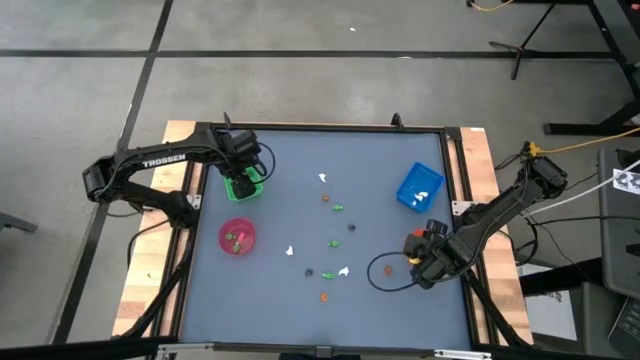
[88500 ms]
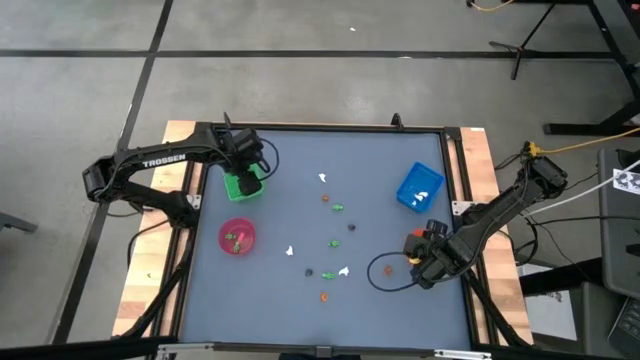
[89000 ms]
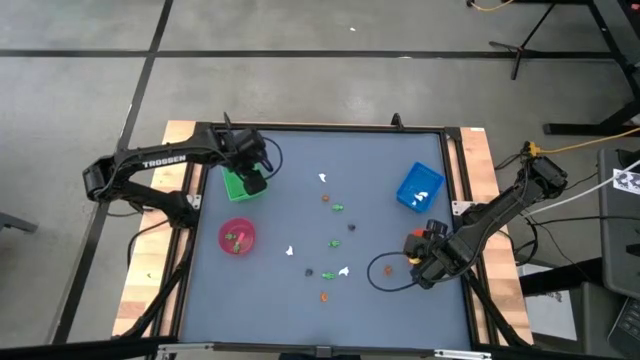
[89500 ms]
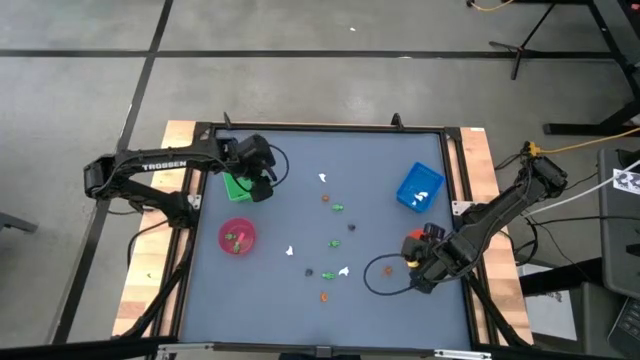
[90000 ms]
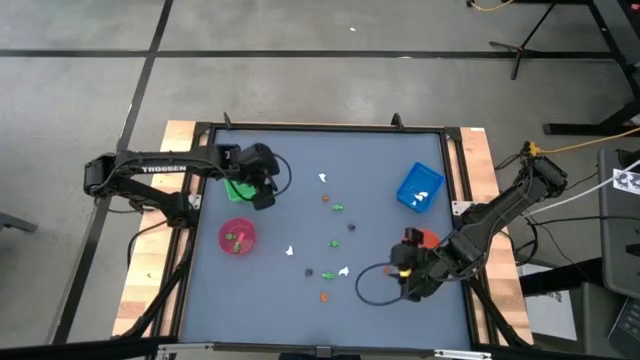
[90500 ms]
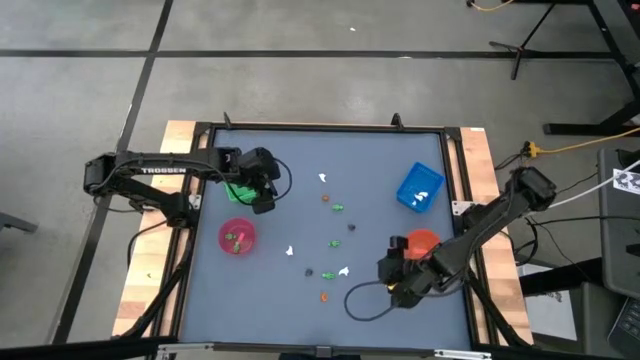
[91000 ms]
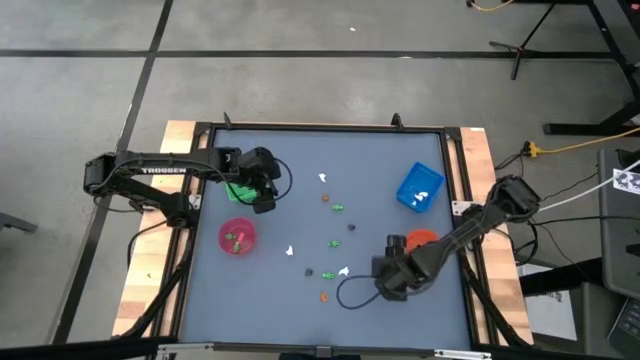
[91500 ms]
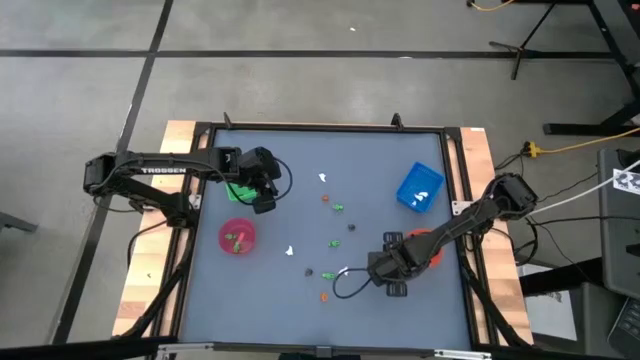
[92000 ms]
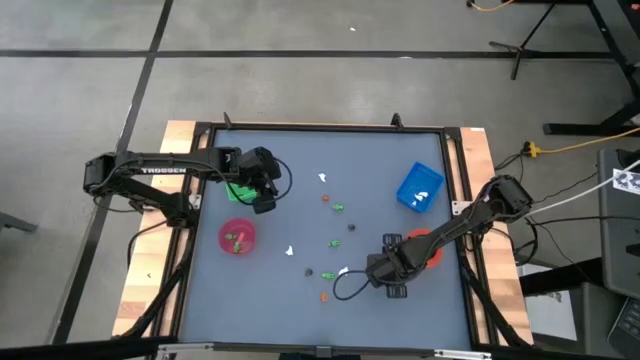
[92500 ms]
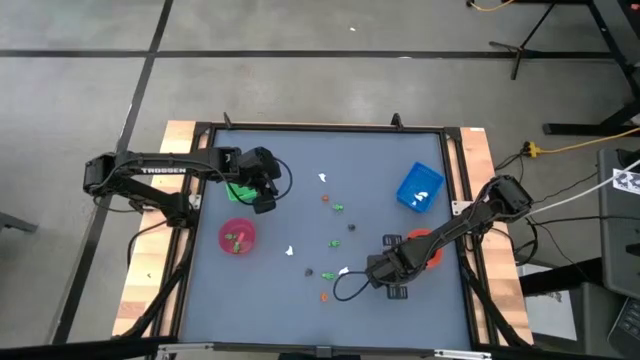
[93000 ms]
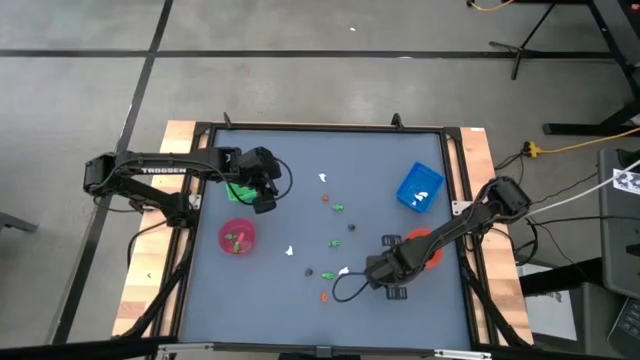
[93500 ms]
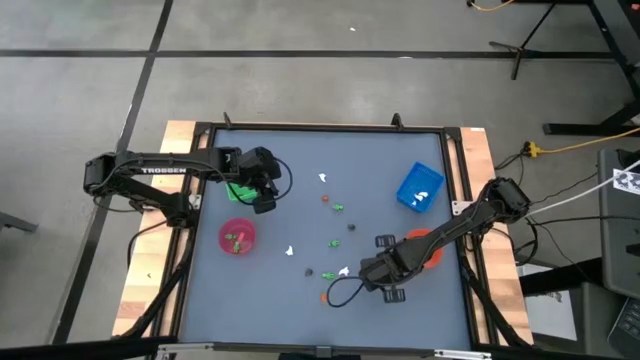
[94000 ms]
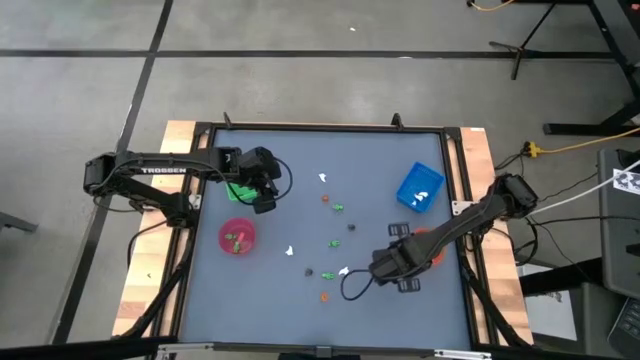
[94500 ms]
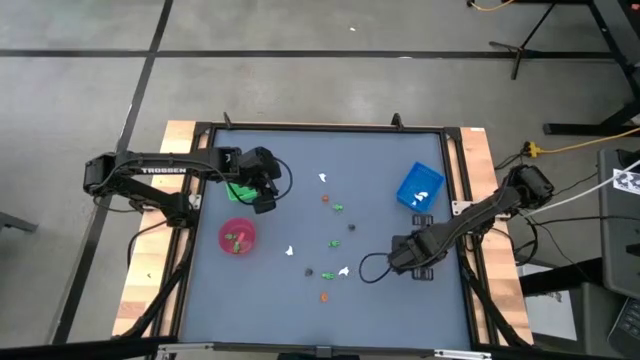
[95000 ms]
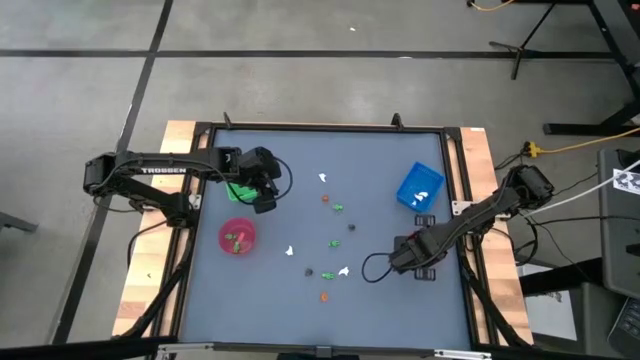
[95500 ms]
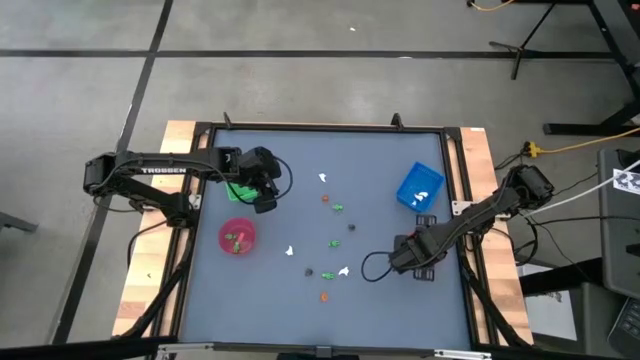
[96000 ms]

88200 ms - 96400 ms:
Task: Sort Halloween decoration
Put the small orange pumpkin toy into the transparent orange bowl

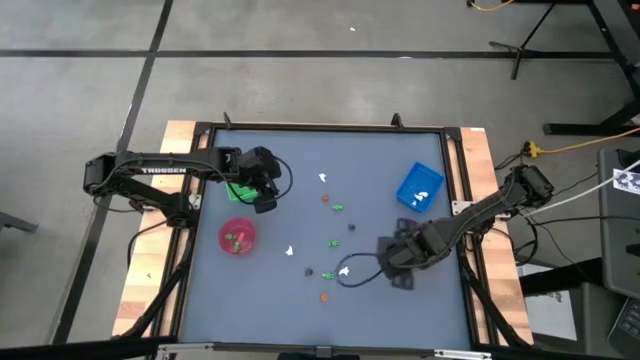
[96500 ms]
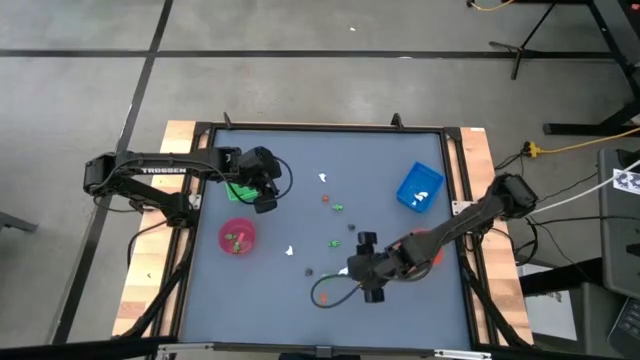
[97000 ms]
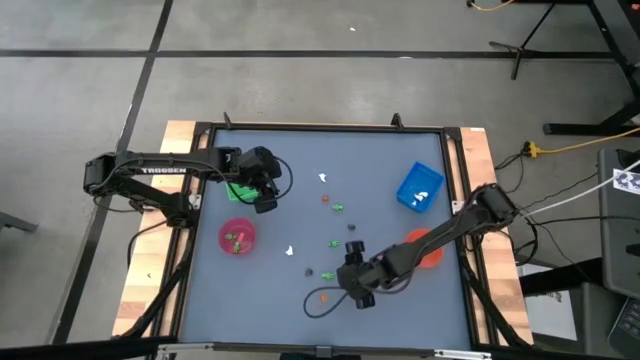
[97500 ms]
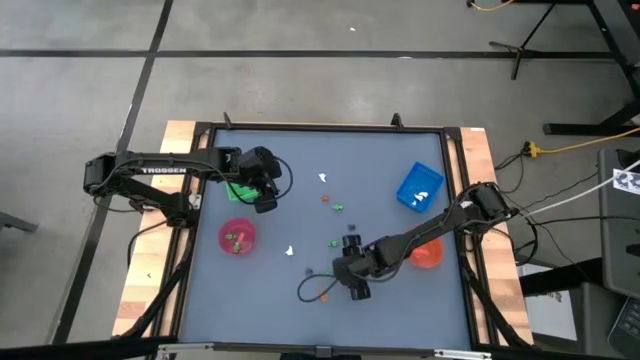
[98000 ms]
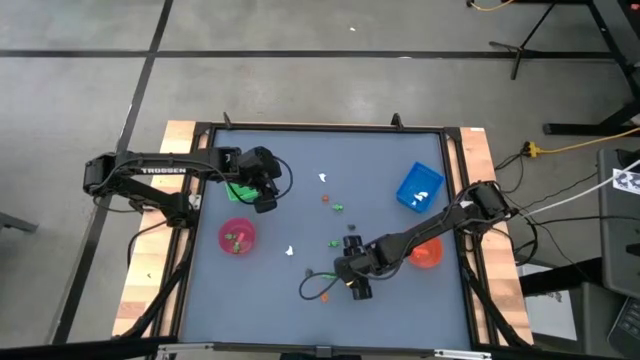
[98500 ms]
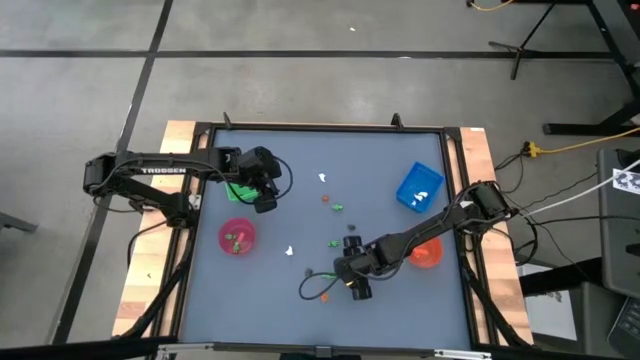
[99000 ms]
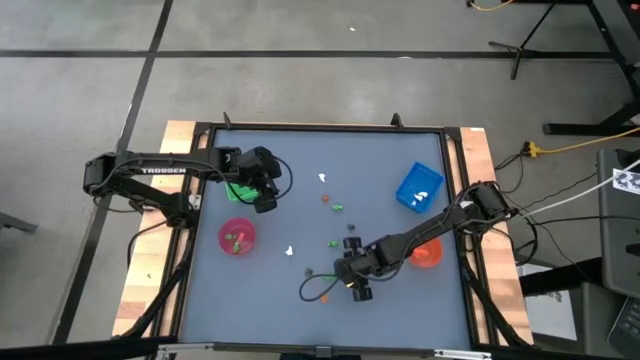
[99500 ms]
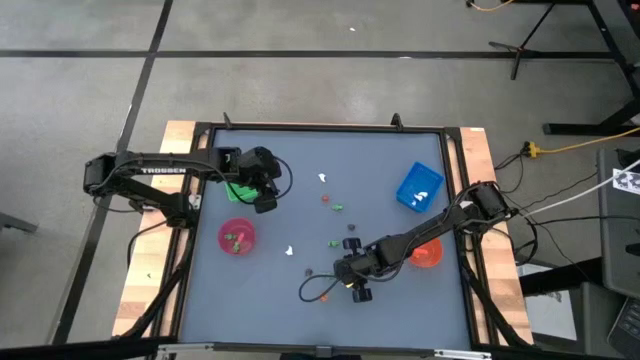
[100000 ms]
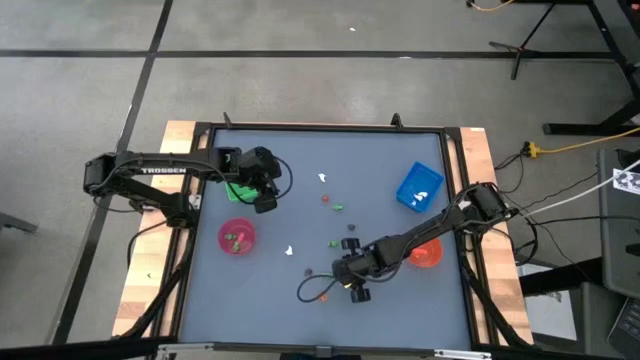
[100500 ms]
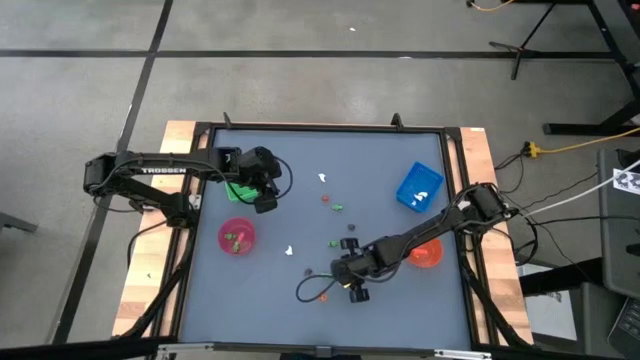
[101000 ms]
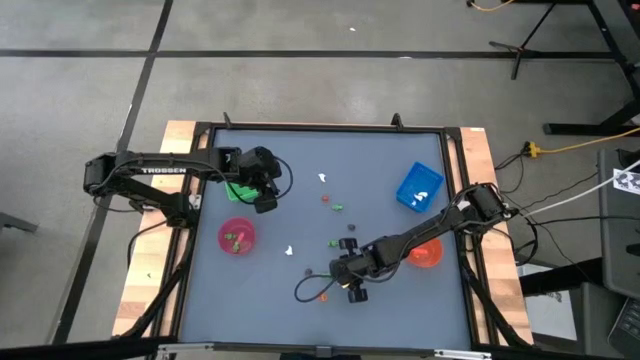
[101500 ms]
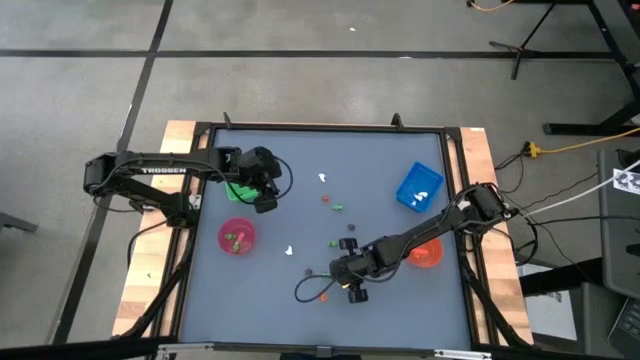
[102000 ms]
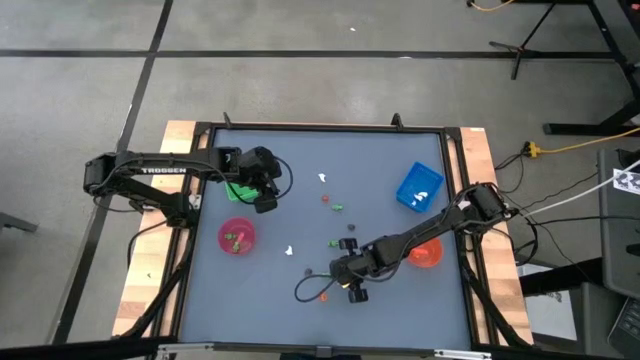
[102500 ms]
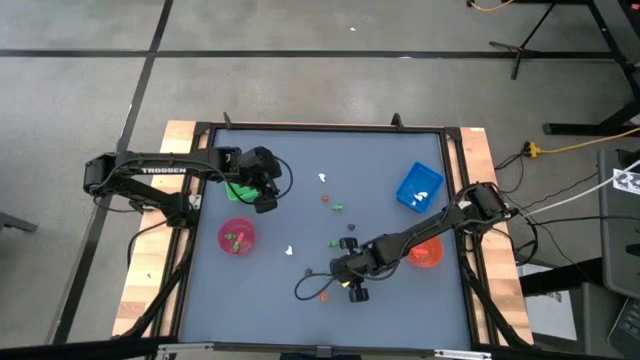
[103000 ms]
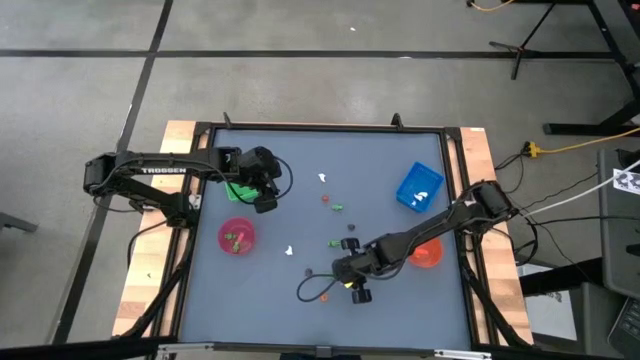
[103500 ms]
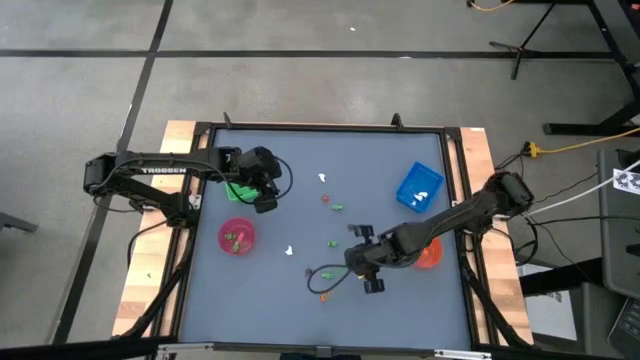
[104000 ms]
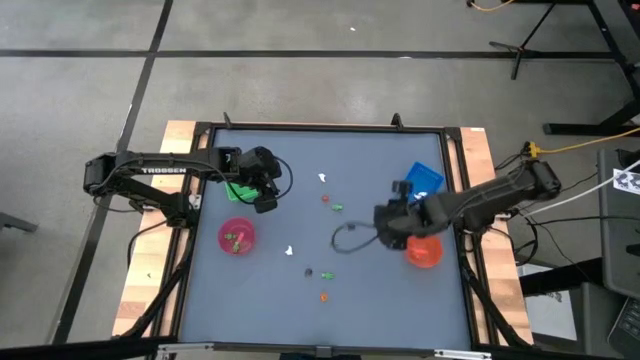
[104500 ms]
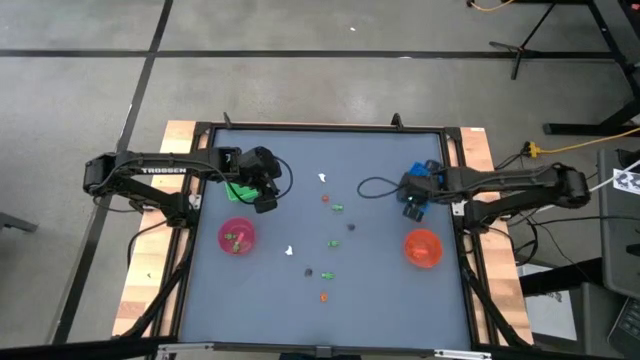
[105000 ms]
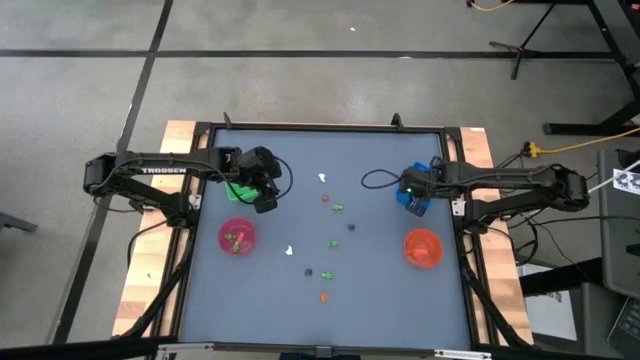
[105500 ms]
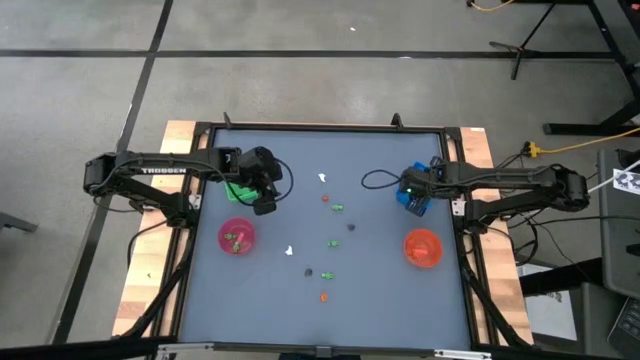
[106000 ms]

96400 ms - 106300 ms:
Put the small white ghost toy into the blue basket

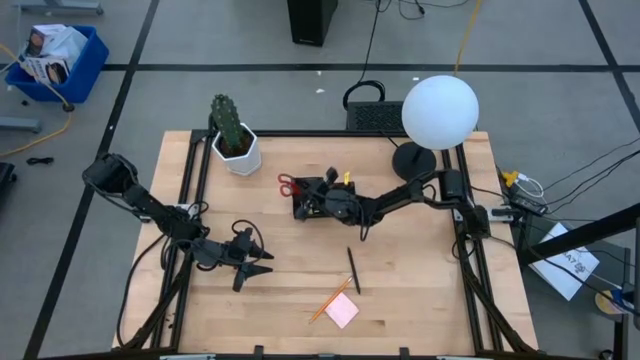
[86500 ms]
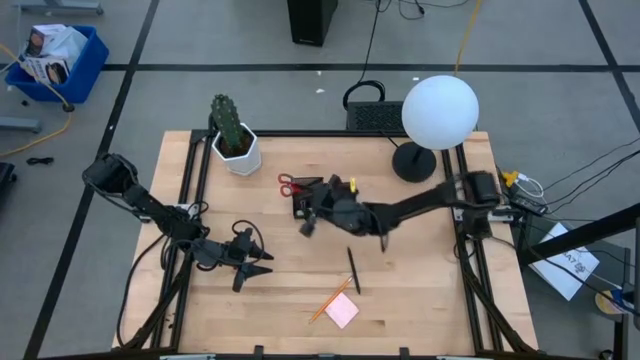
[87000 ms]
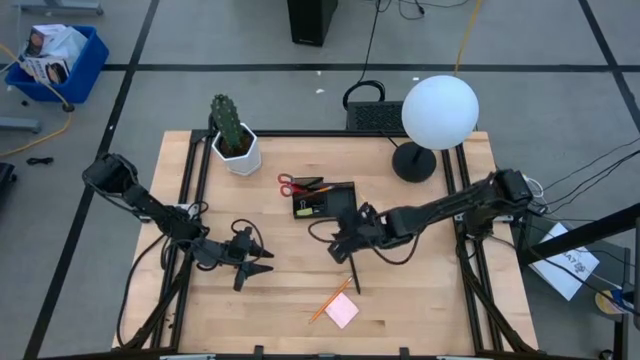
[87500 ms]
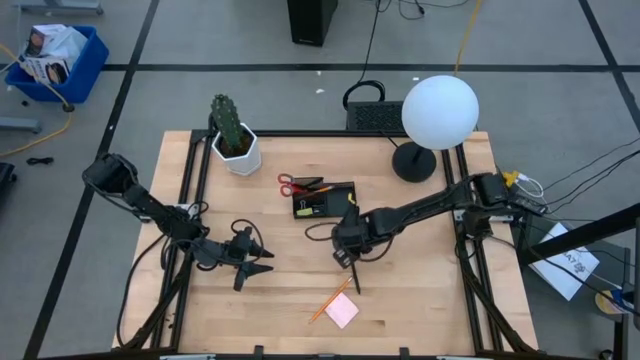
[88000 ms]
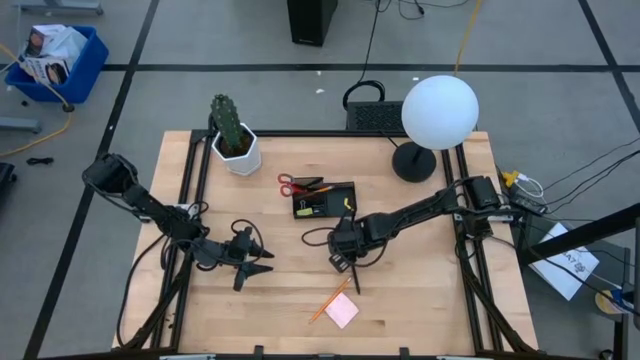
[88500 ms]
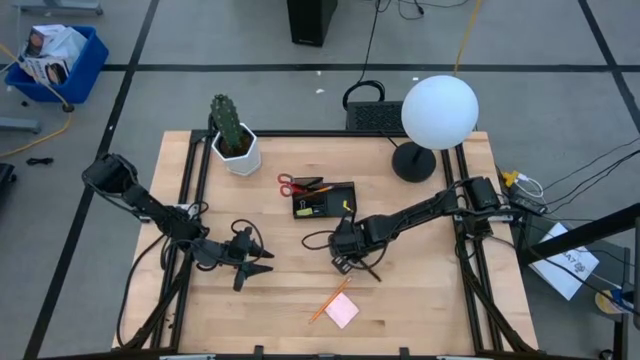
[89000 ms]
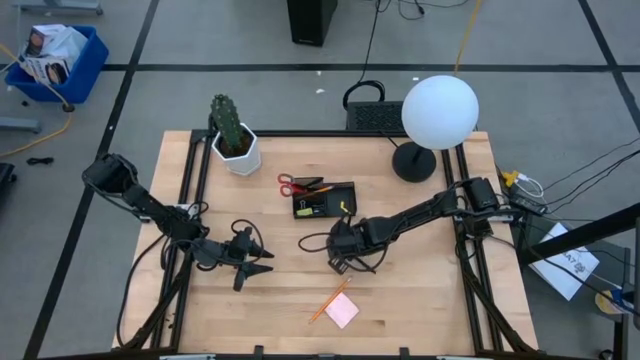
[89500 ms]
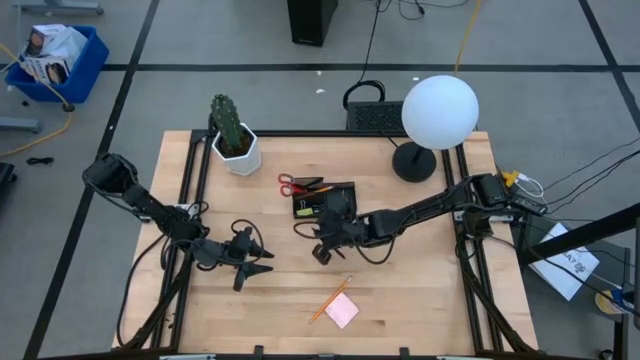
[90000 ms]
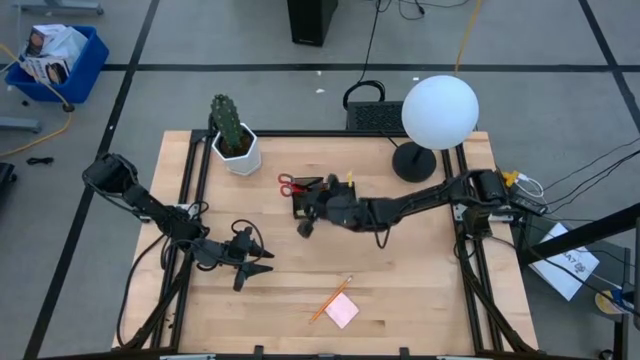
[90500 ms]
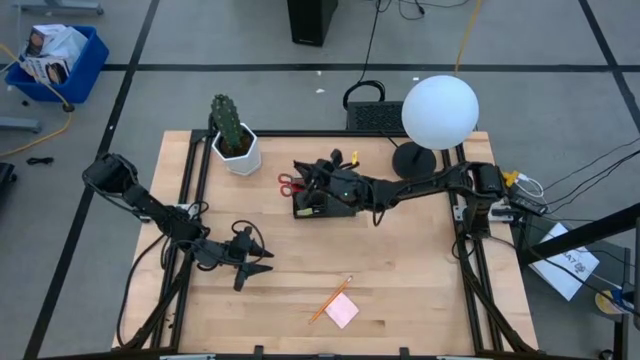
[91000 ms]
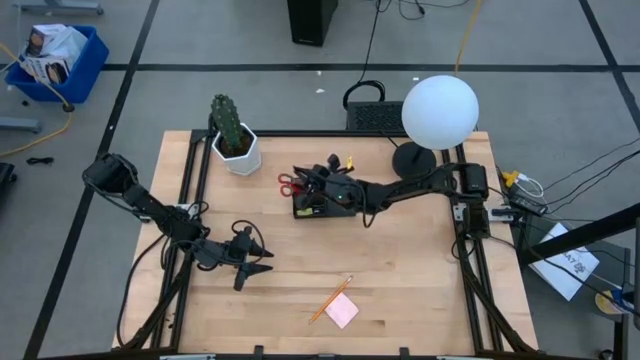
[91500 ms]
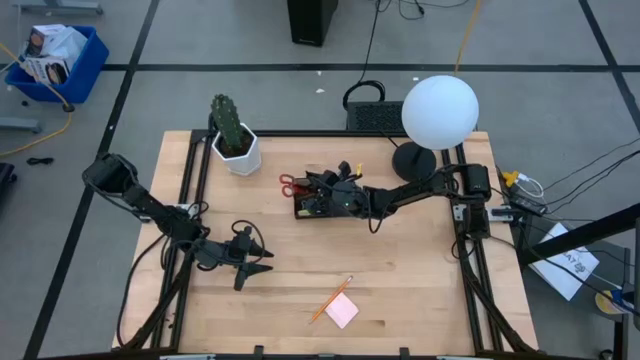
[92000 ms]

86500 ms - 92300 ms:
Task: Pick and place office supplies into organizer
Put the black pen into the top left of the desk organizer
